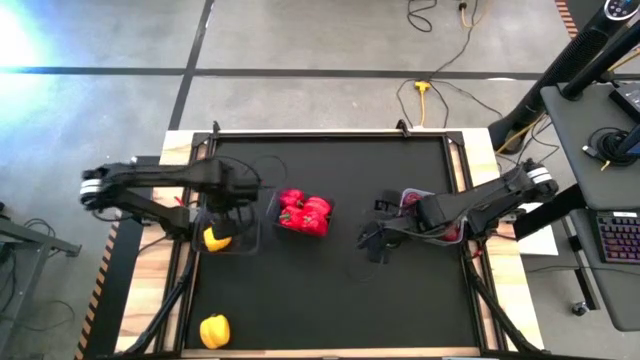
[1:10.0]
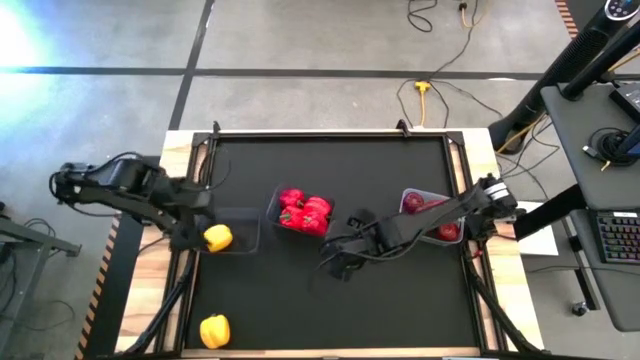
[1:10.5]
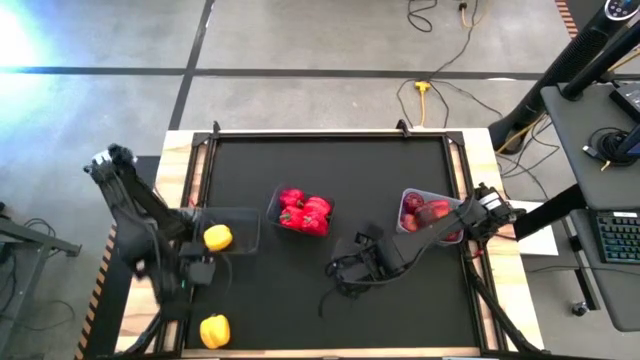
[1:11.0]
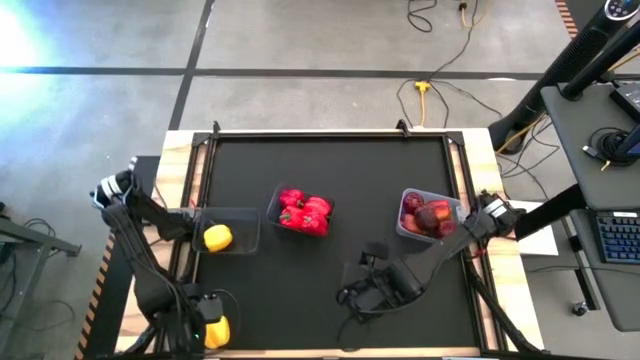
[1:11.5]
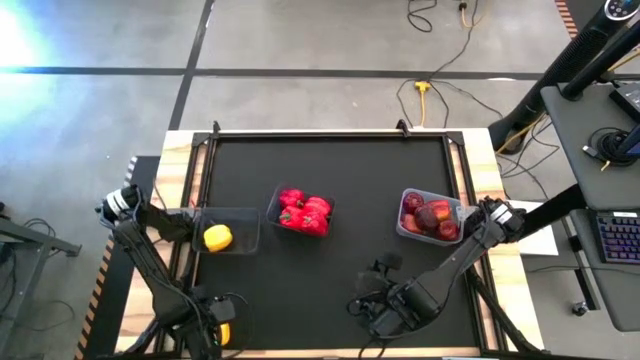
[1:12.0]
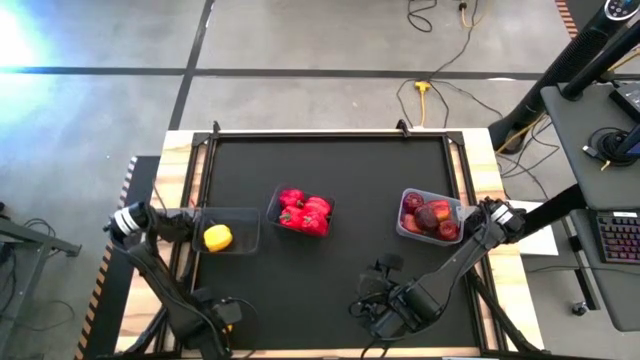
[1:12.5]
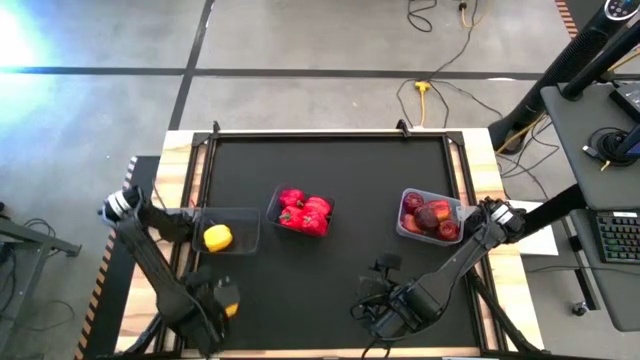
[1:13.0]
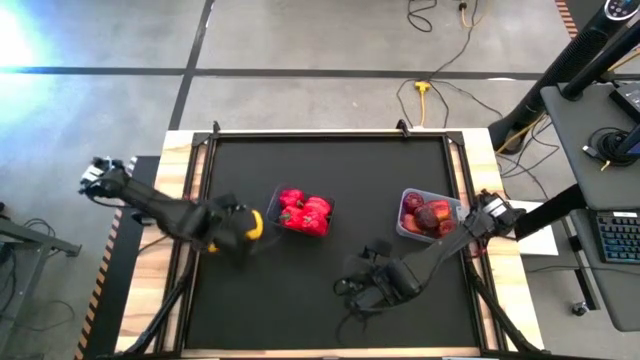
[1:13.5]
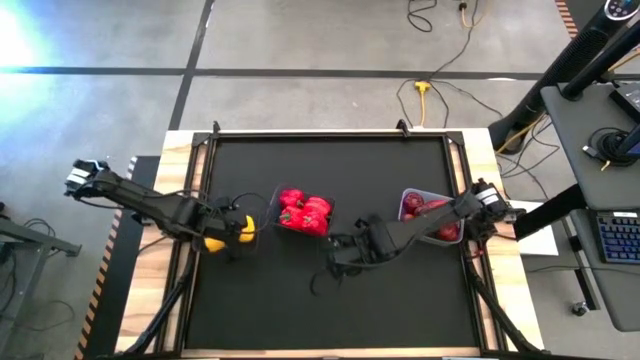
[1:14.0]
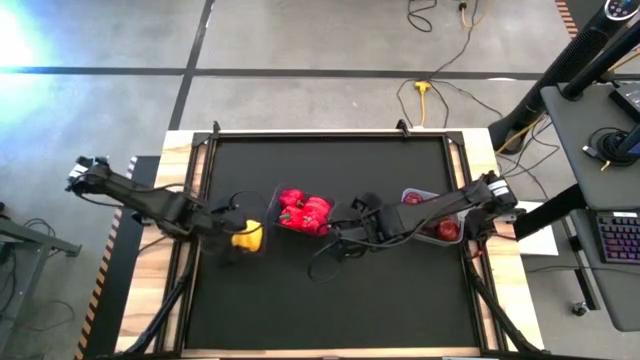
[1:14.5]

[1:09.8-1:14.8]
Task: Sort produce into baskets
Put the yellow bell pepper into the left black bin

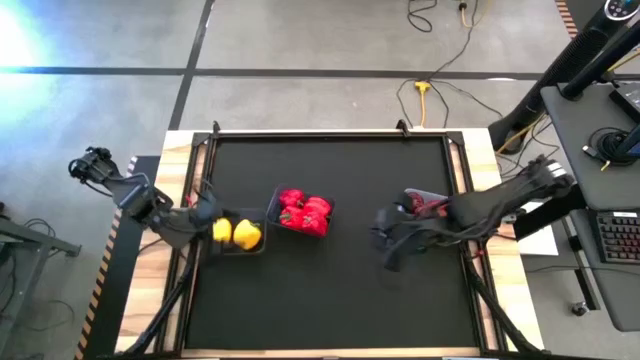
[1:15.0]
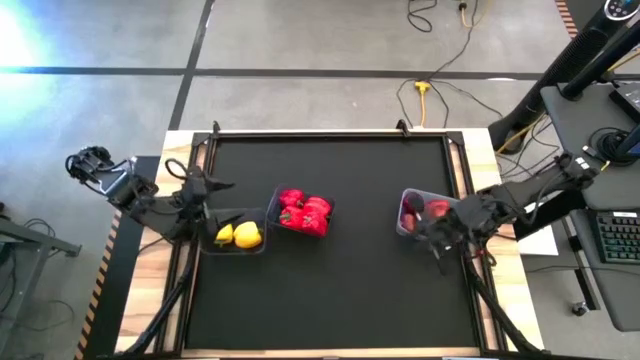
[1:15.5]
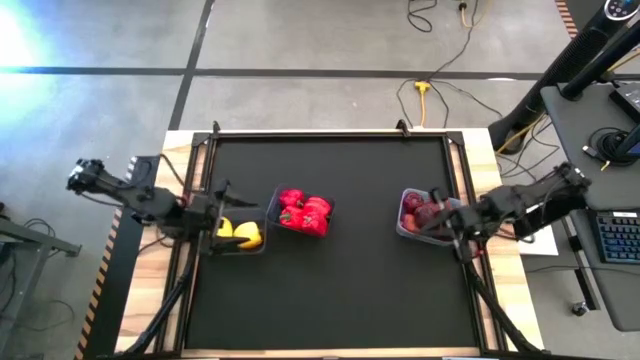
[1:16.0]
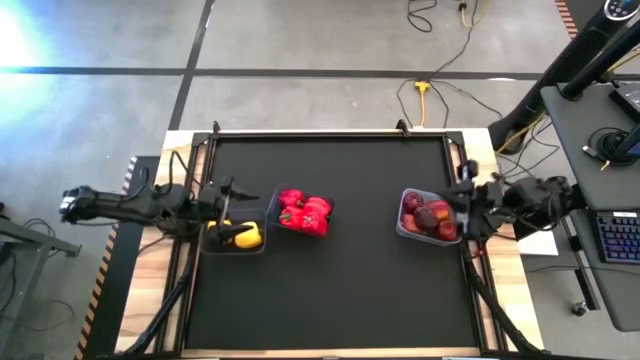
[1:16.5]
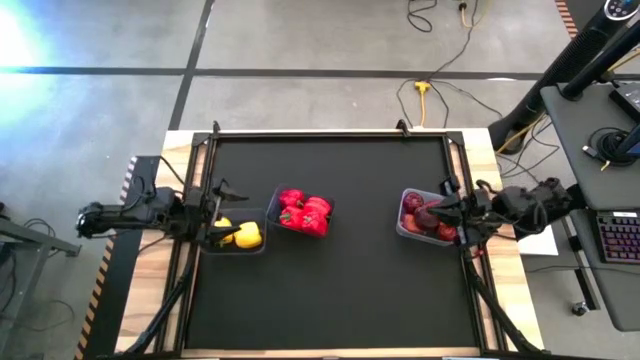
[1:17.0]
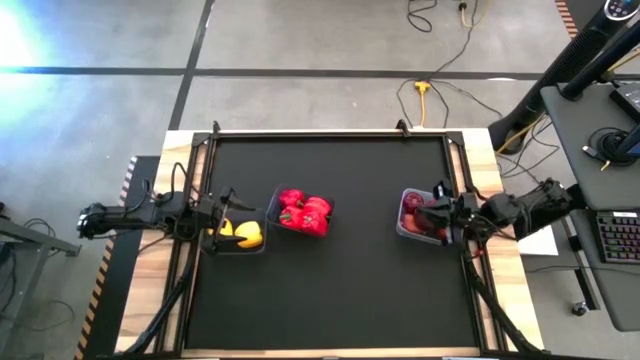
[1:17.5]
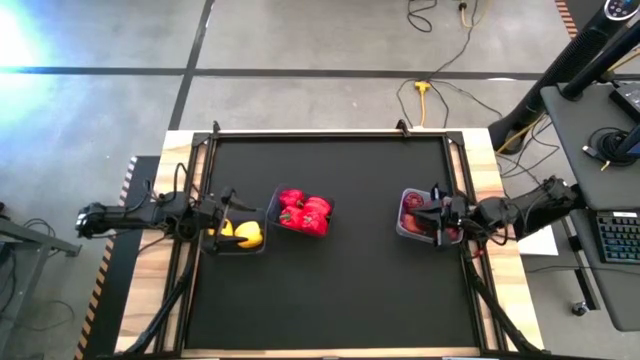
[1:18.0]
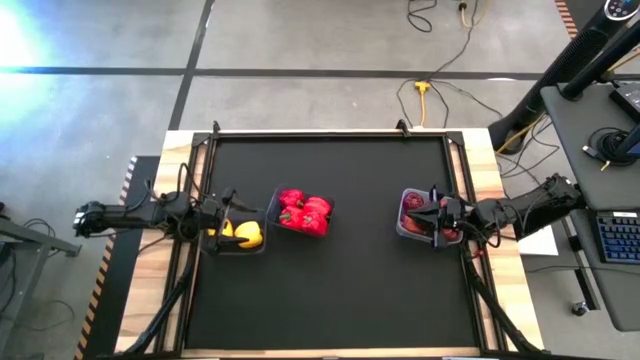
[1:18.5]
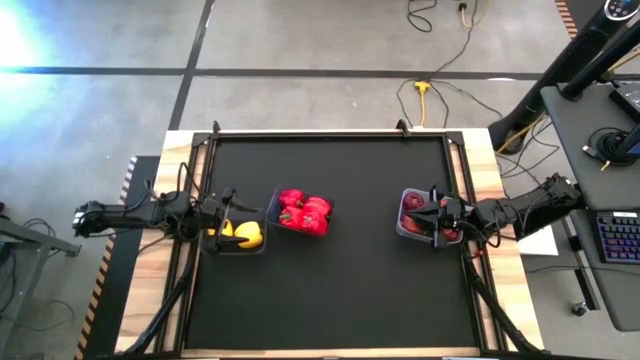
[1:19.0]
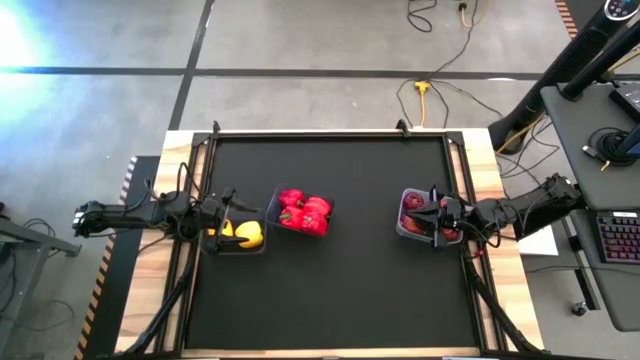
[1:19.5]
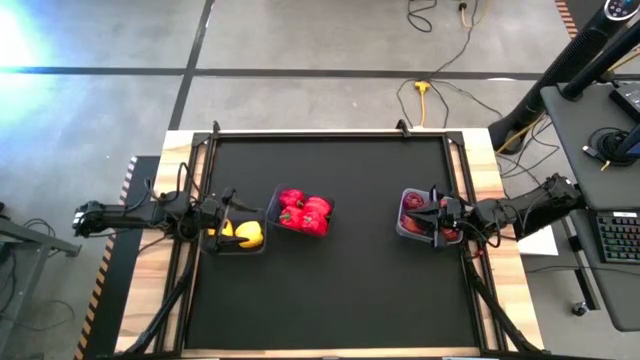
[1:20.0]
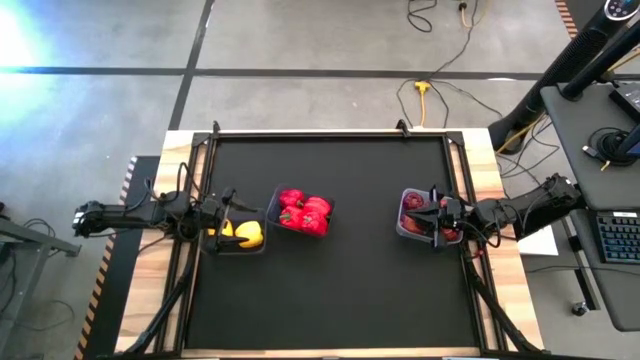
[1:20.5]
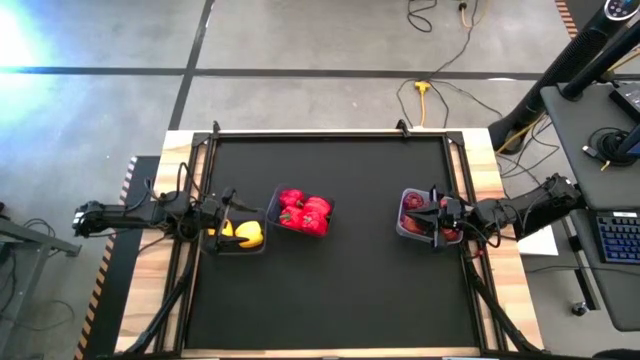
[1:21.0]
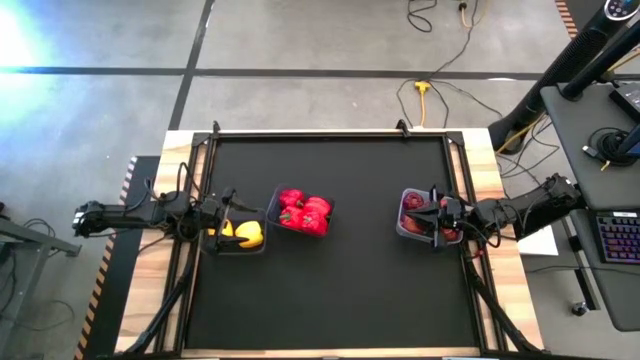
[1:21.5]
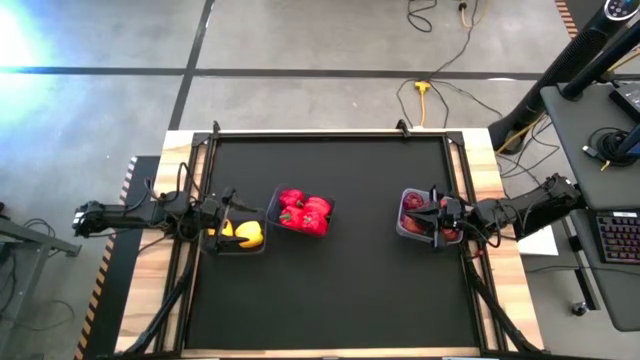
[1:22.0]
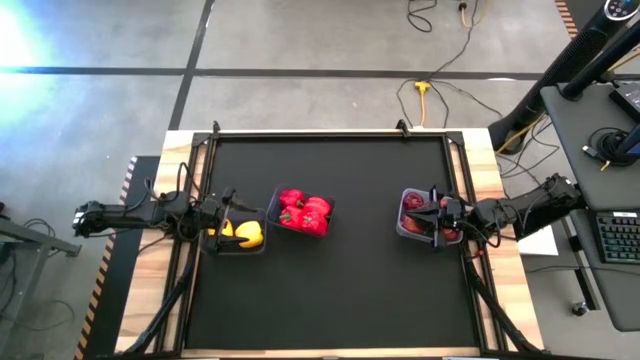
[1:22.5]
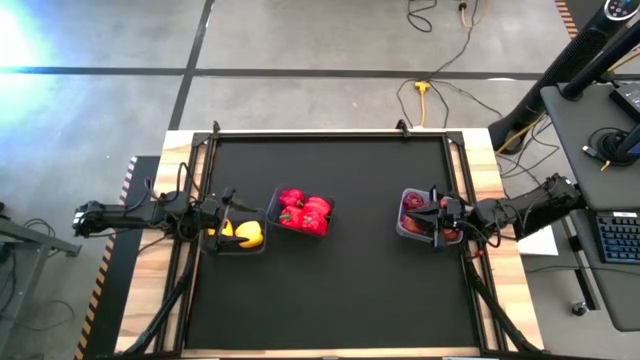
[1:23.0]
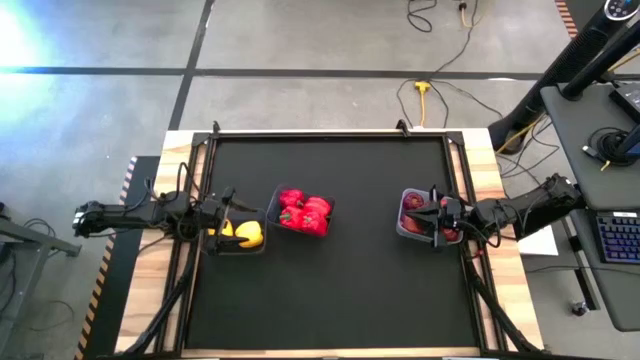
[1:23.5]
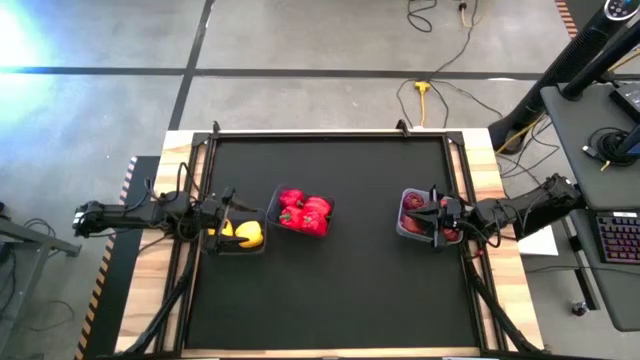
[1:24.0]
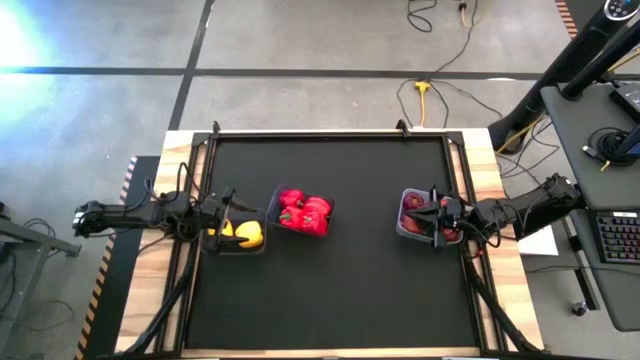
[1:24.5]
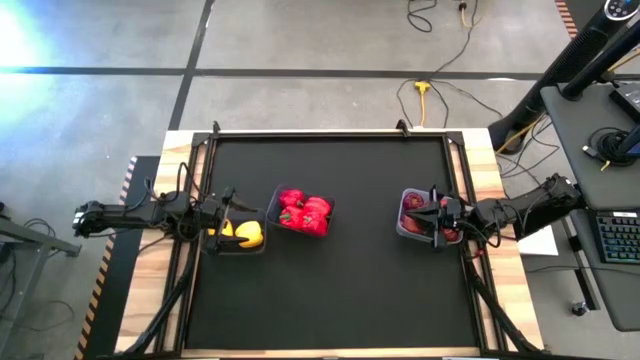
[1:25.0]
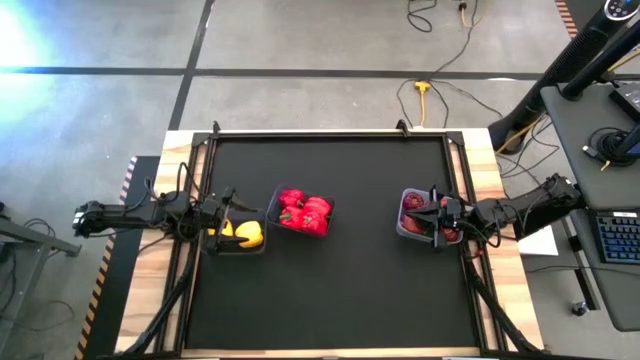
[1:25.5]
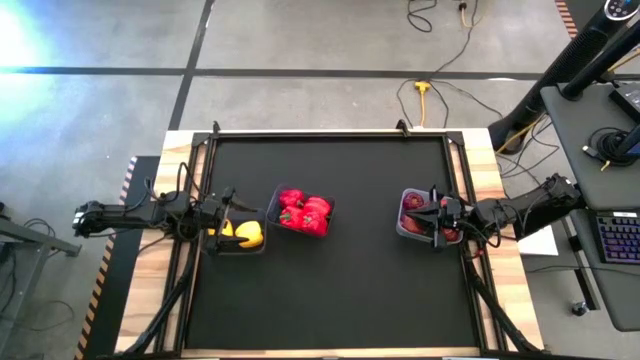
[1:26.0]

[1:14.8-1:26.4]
Return to Home Position

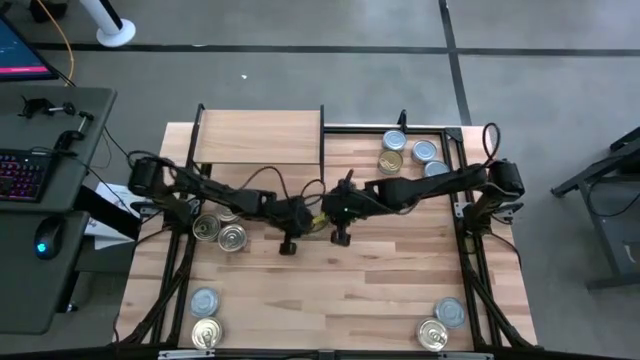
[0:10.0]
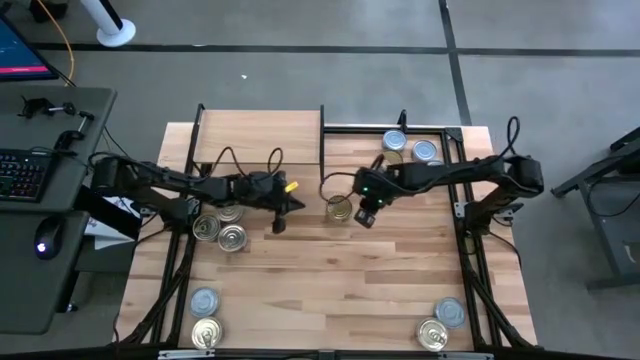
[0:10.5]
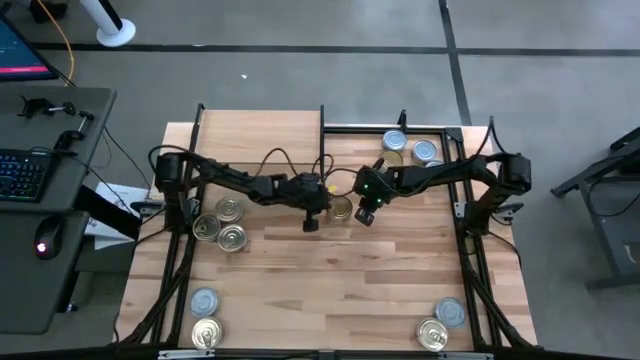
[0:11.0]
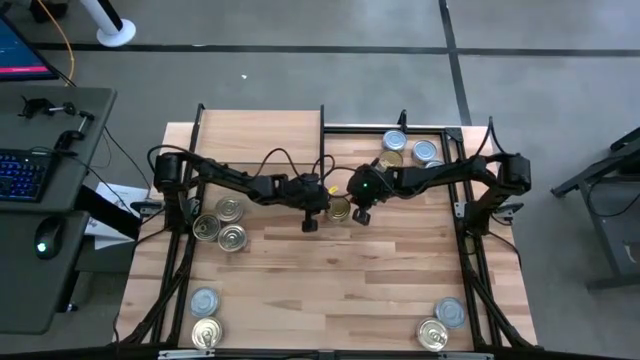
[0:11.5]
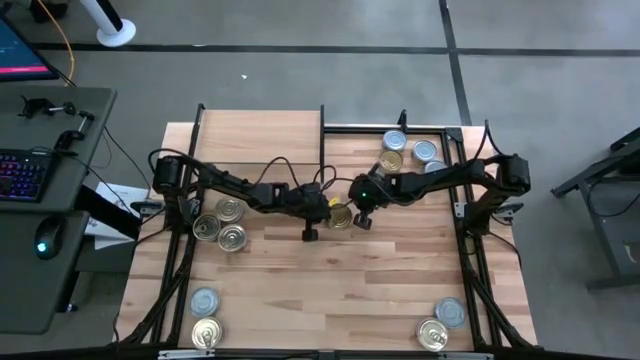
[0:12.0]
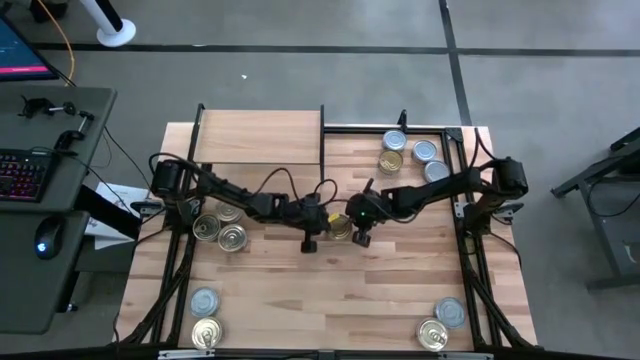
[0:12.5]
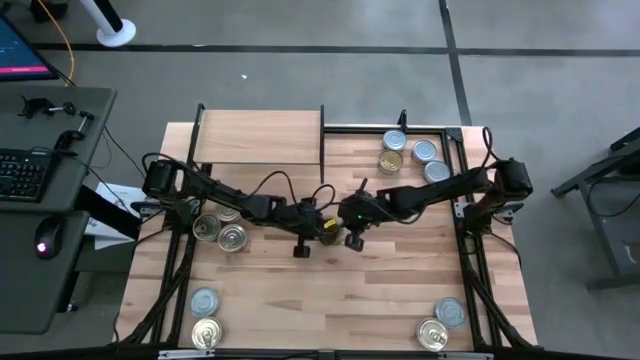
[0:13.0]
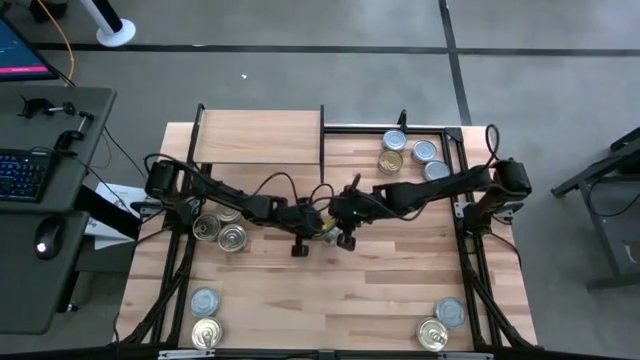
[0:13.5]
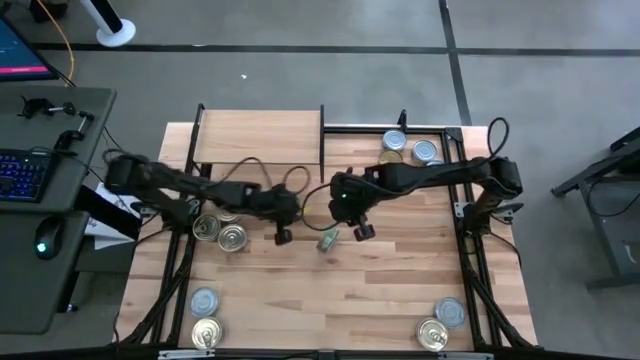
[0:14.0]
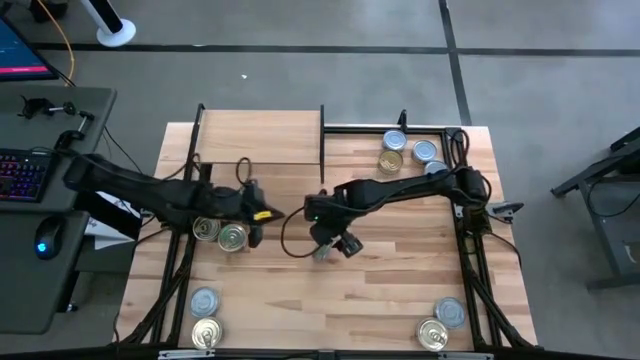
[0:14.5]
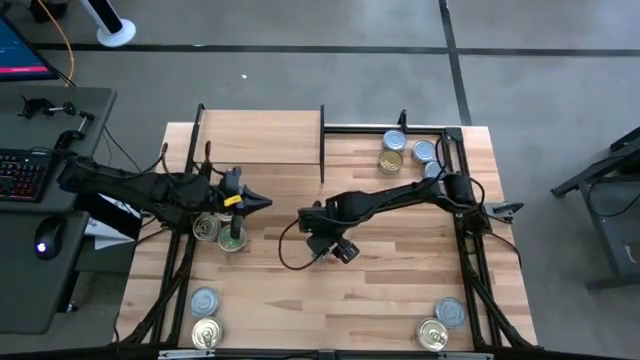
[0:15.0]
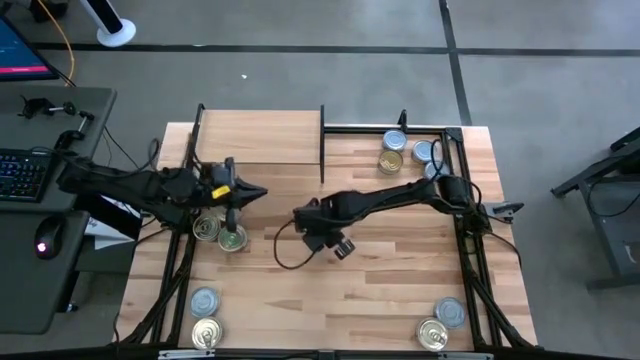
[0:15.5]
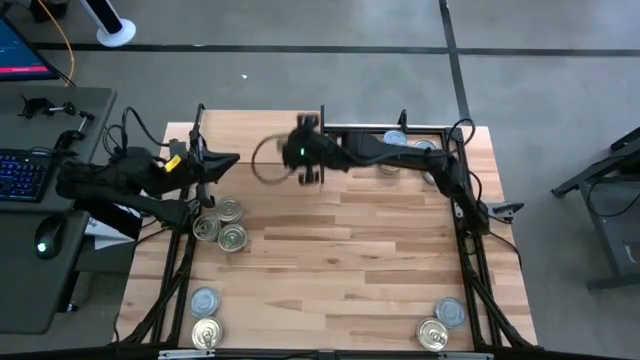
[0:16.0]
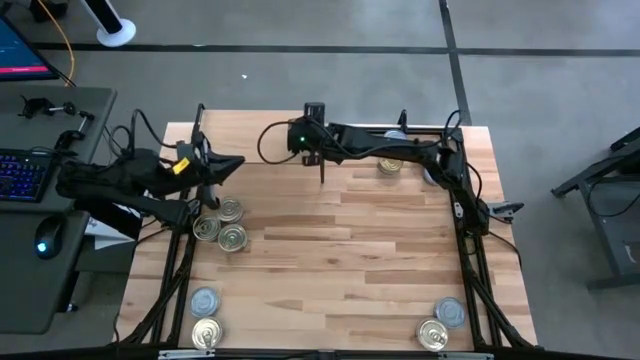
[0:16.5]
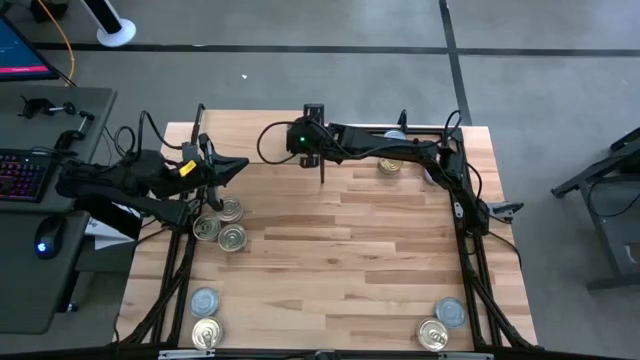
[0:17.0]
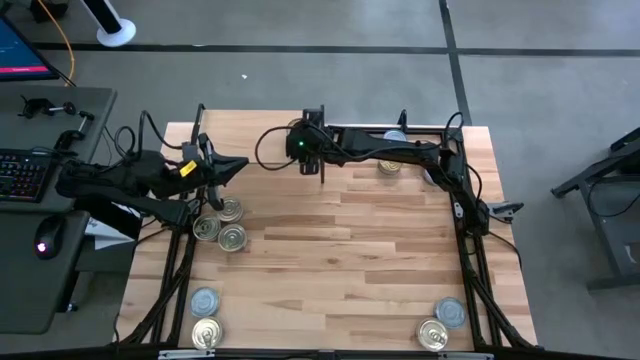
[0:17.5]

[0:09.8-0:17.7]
Task: Stack canned seafood by type on shelf
Put the green tuna can on the shelf
